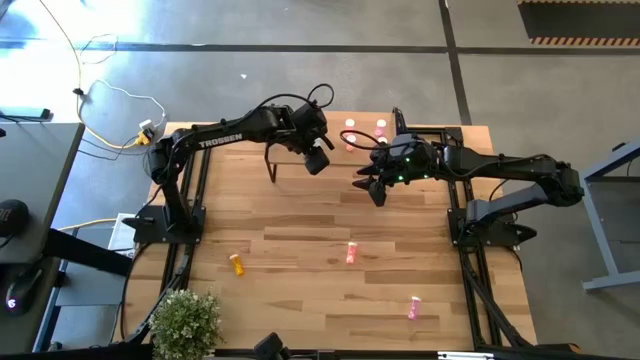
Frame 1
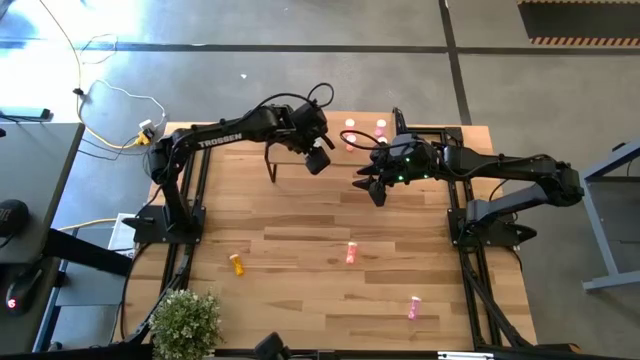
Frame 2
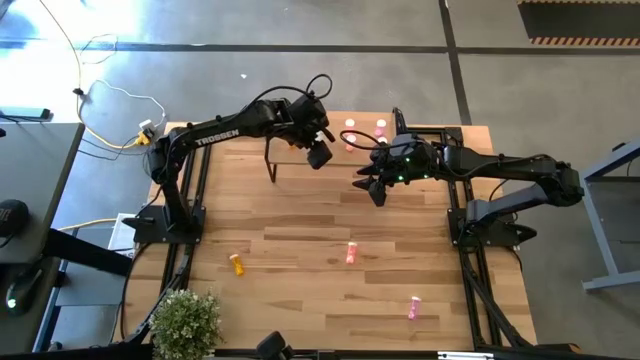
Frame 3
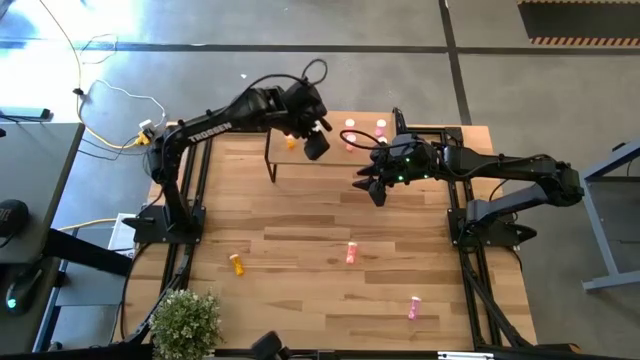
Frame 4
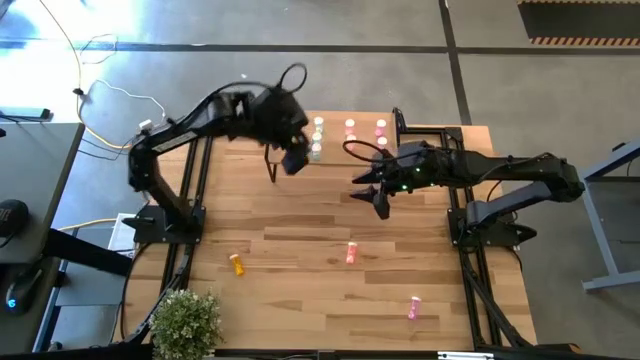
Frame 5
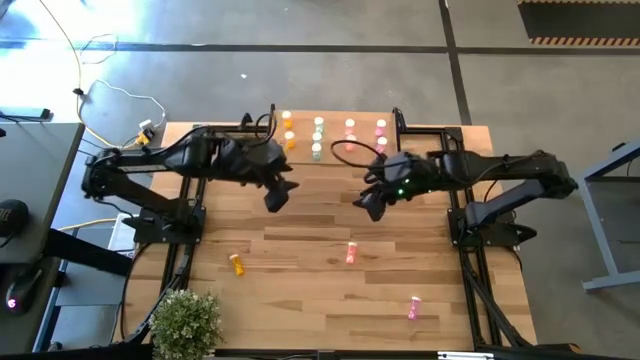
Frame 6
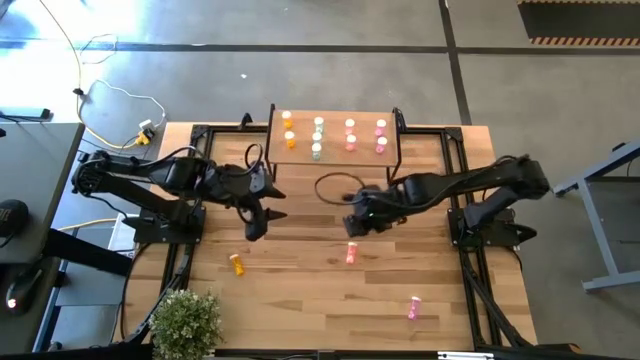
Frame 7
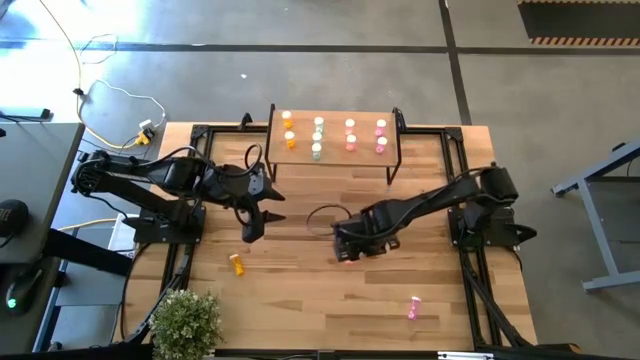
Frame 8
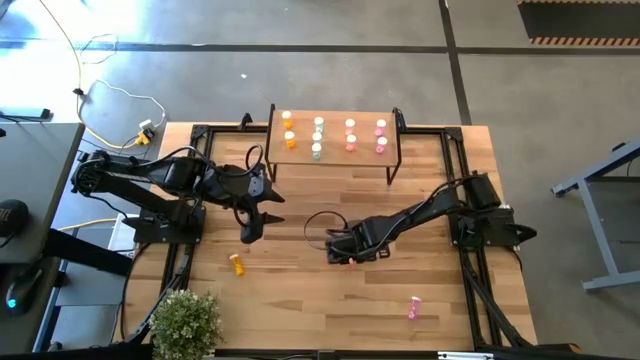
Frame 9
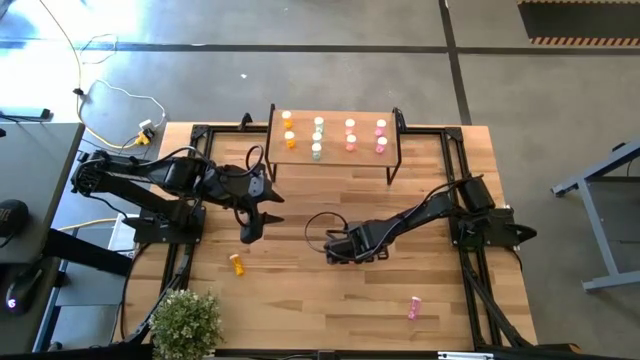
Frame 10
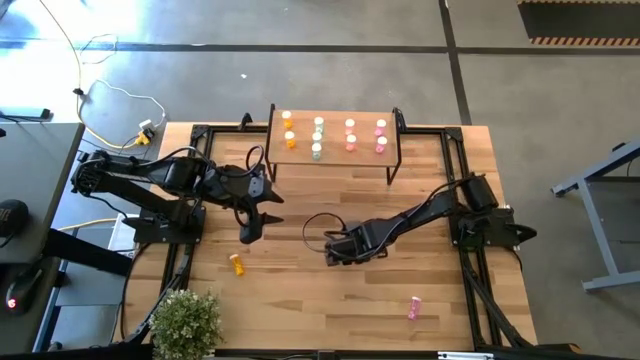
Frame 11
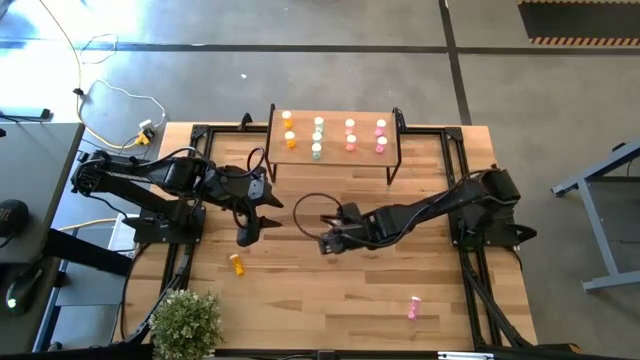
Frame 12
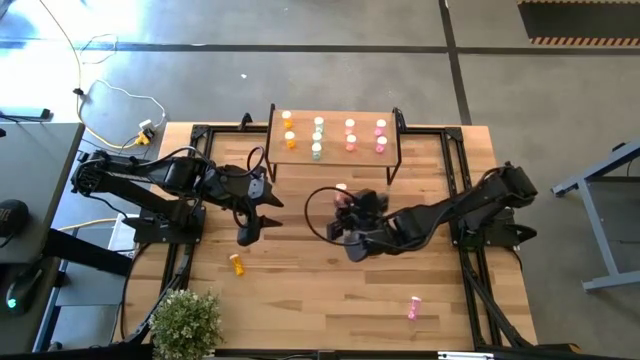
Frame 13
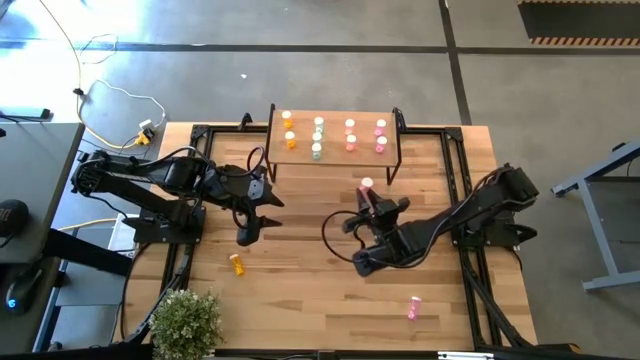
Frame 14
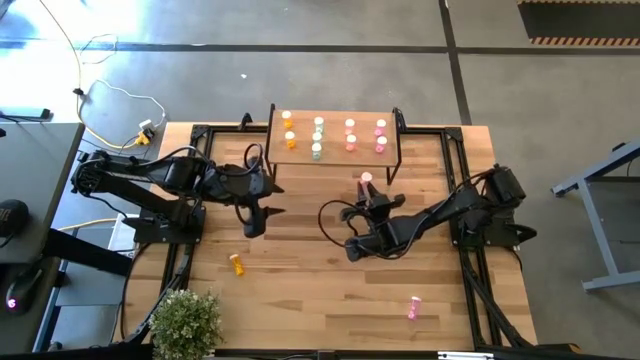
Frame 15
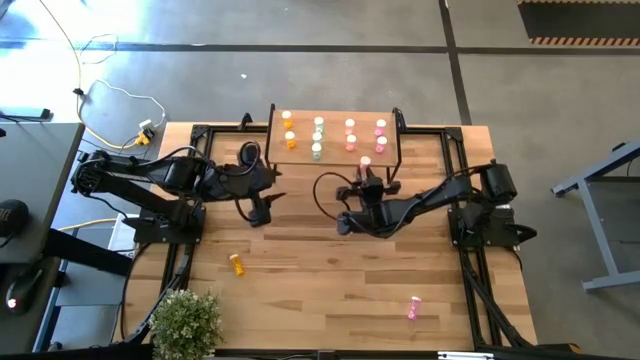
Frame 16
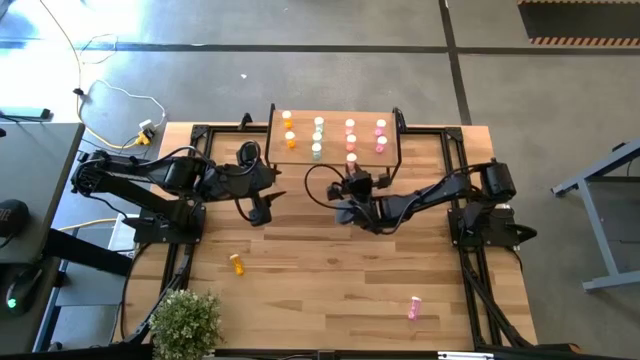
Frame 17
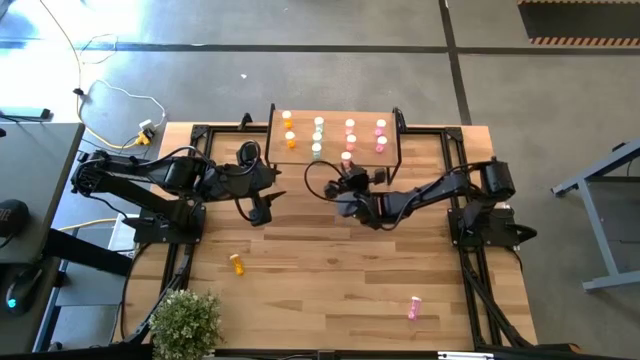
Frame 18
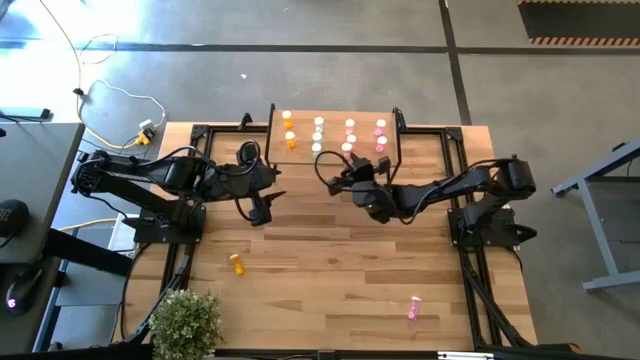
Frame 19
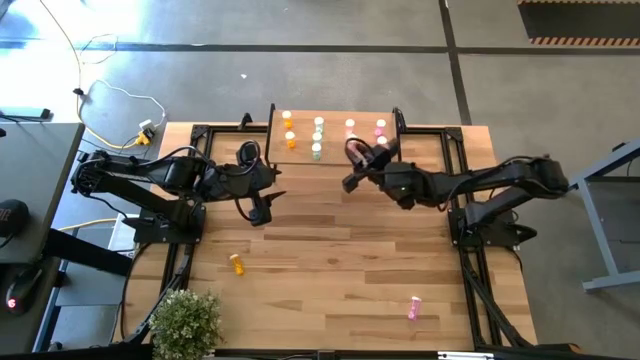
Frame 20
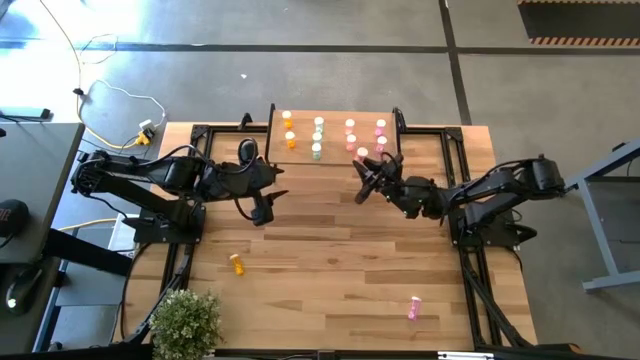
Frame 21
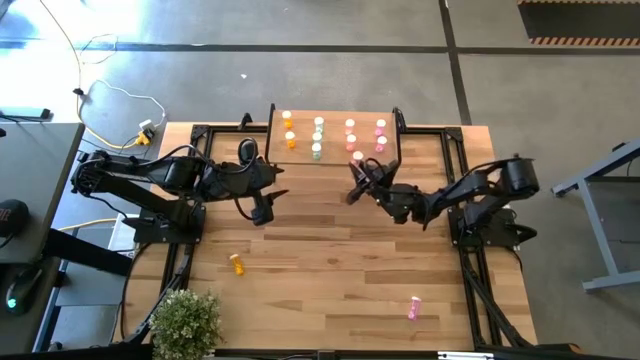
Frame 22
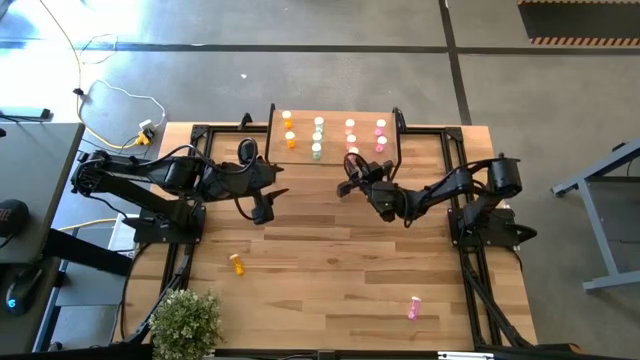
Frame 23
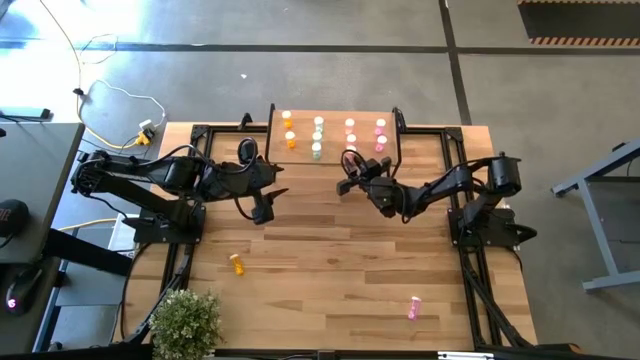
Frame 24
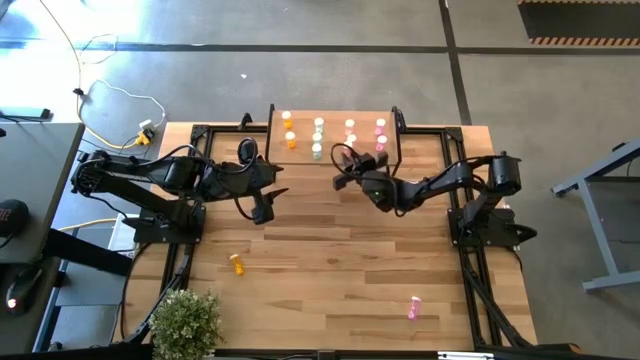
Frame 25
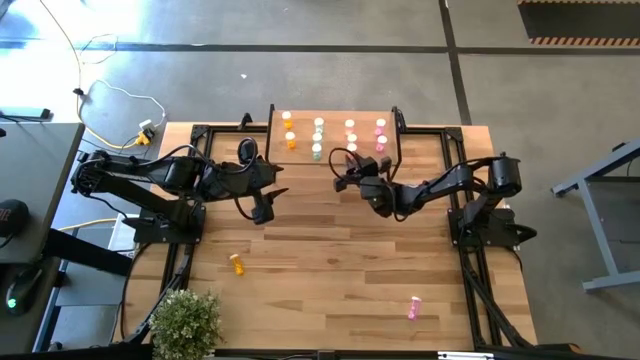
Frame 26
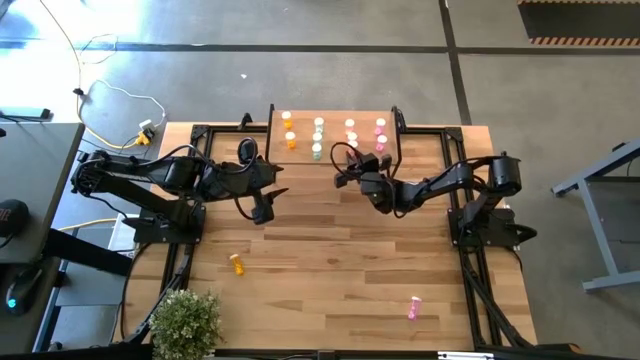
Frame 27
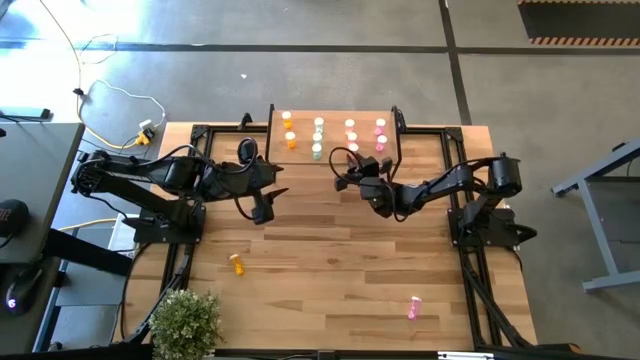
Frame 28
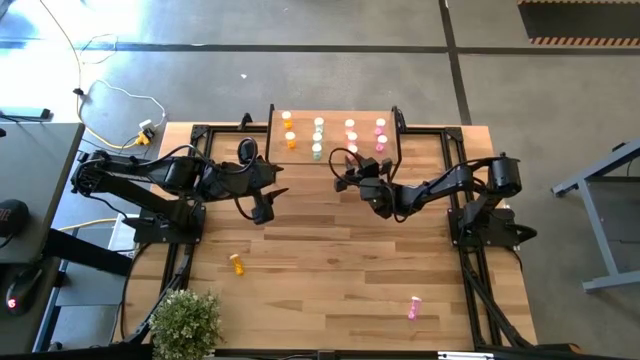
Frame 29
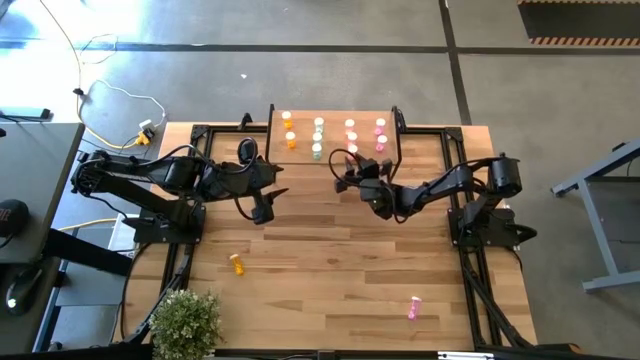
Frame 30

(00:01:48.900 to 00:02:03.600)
Task: Pick and place medicine bottles onto shelf by color
Put the pink pill bottle on the shelf aligned with the pink pill bottles

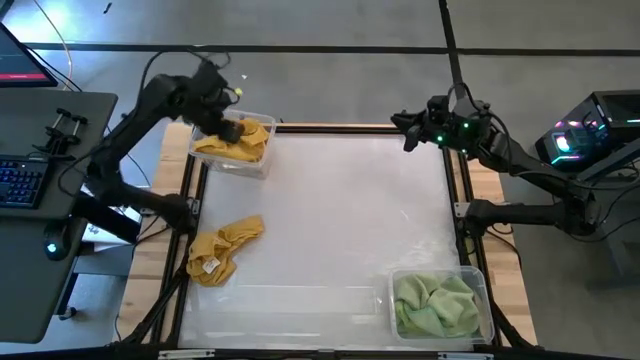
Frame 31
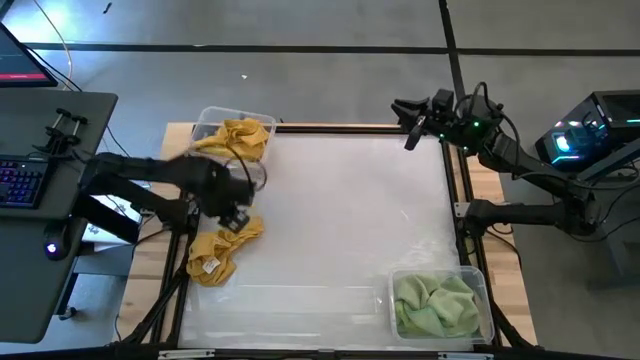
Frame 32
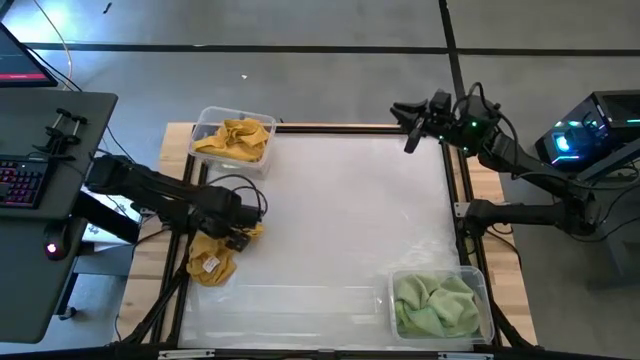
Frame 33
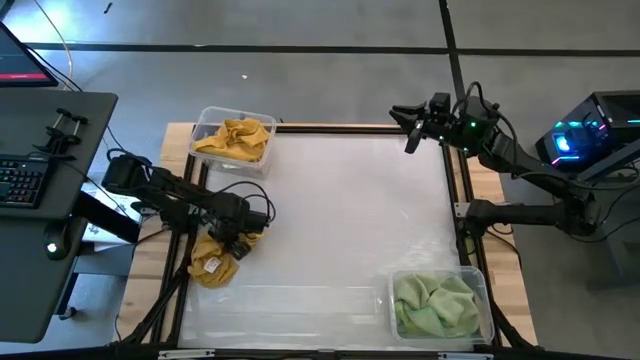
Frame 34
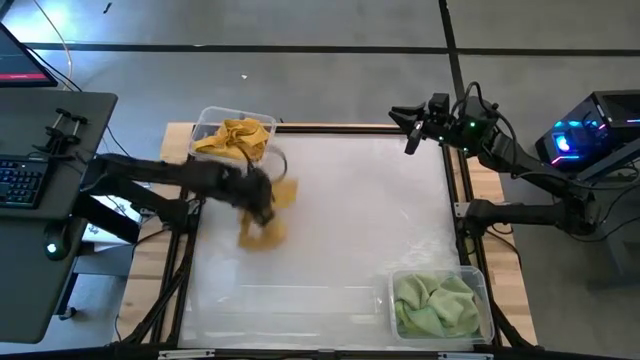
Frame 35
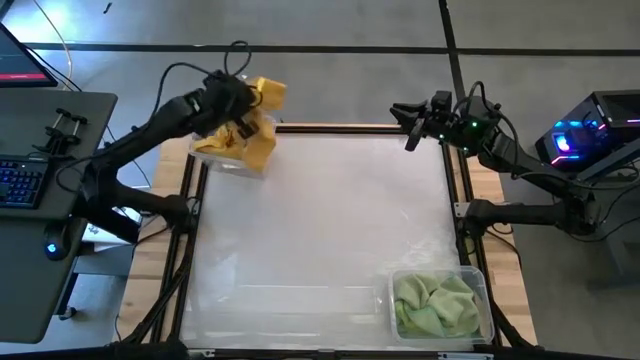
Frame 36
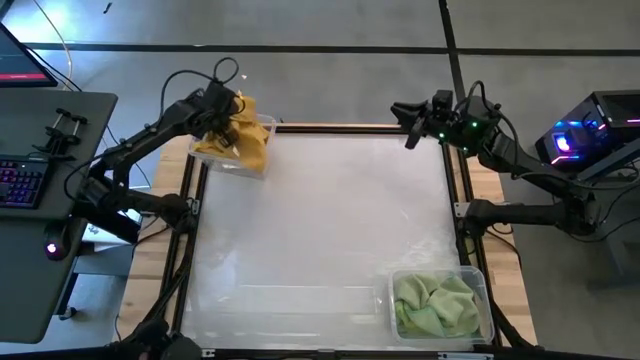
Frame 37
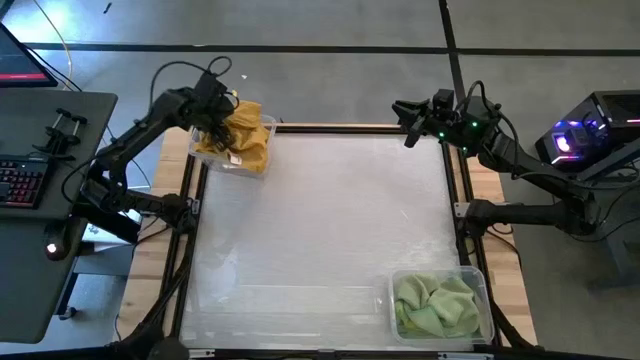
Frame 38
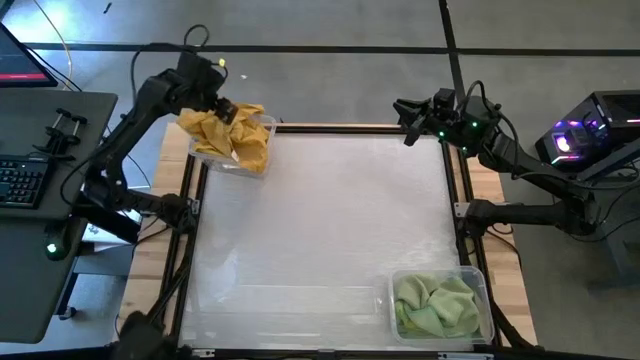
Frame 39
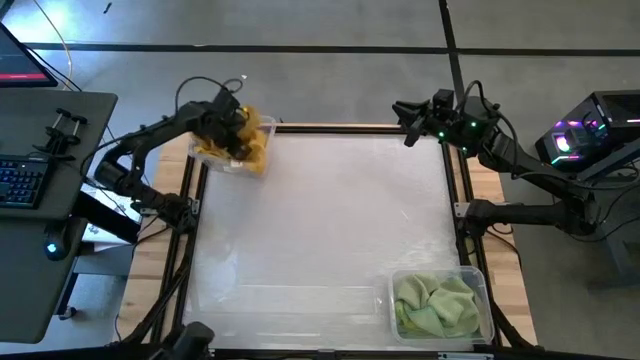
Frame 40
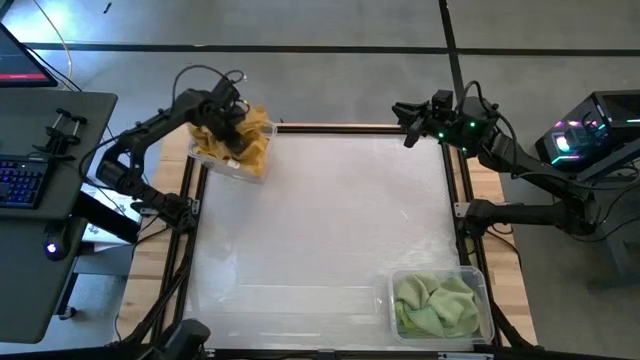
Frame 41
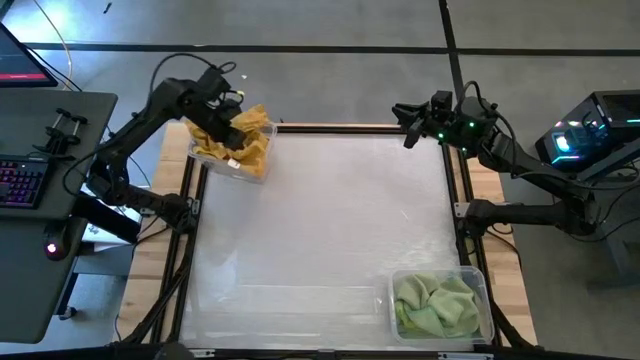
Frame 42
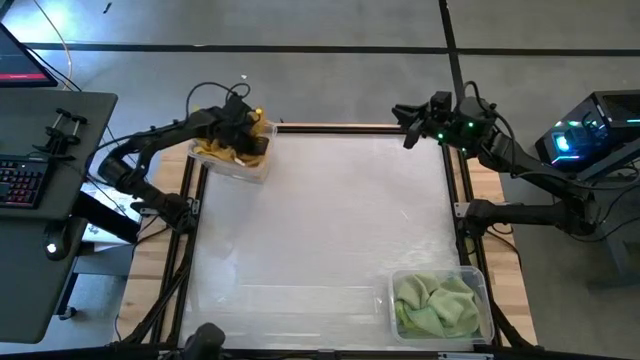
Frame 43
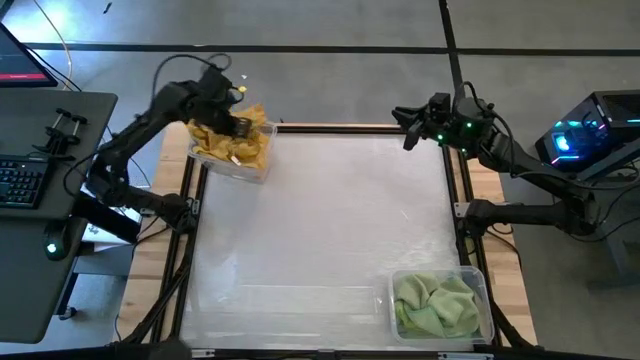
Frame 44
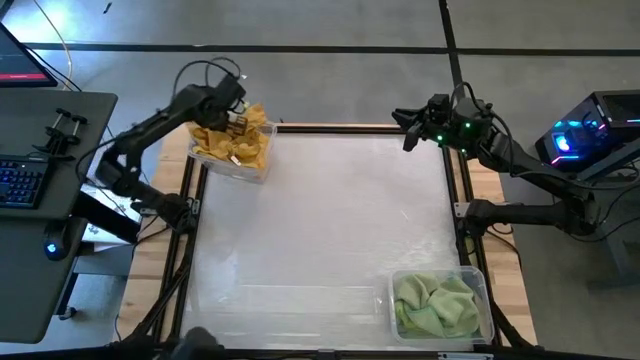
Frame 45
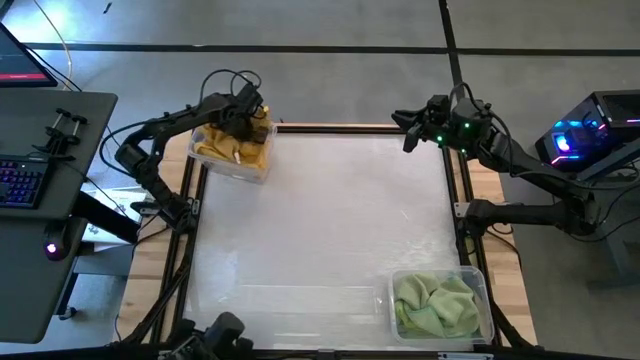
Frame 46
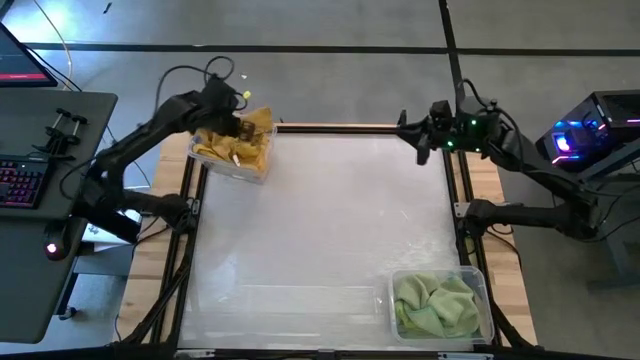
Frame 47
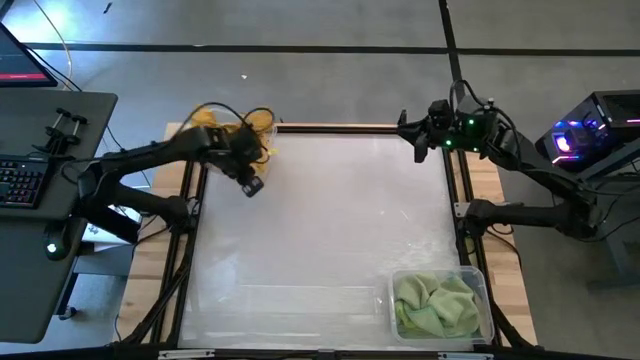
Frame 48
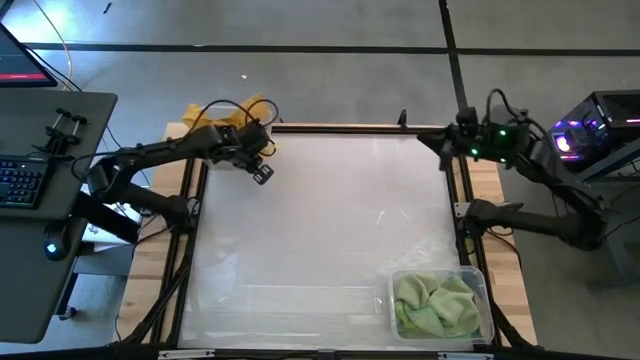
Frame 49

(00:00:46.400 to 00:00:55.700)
Task: Sort towels by color in basket
Put the yellow kitchen towel into the top transparent bin
